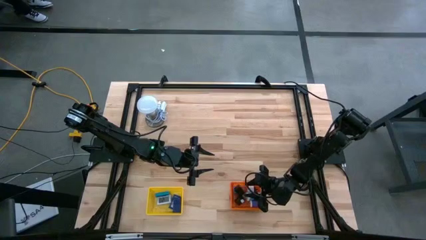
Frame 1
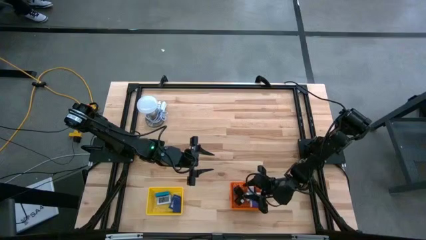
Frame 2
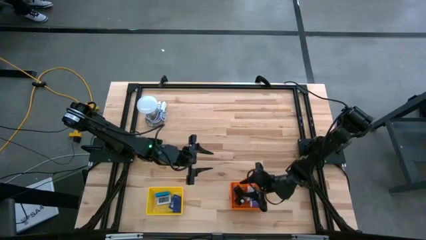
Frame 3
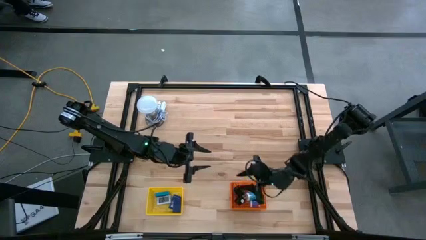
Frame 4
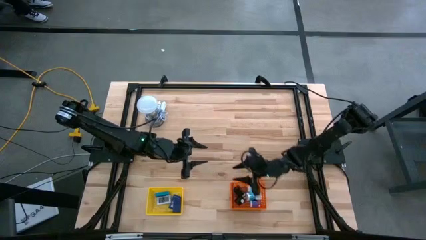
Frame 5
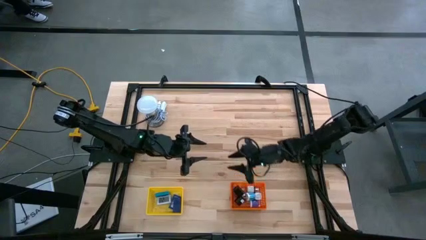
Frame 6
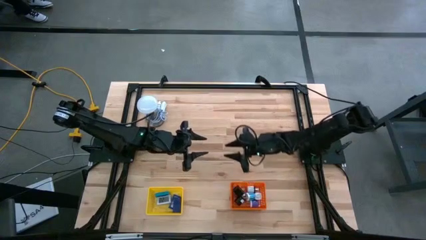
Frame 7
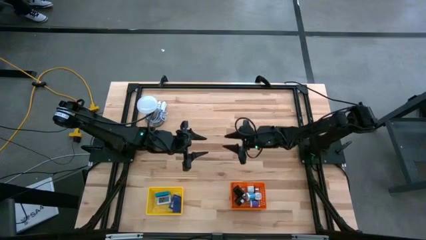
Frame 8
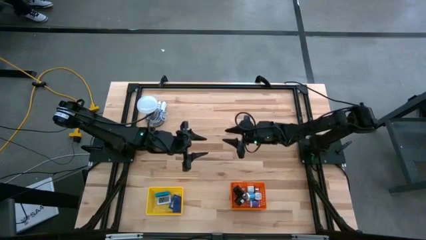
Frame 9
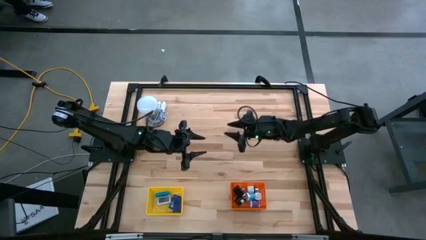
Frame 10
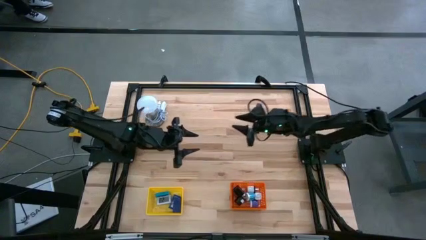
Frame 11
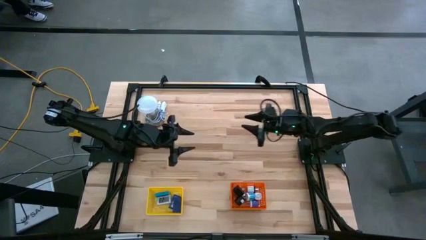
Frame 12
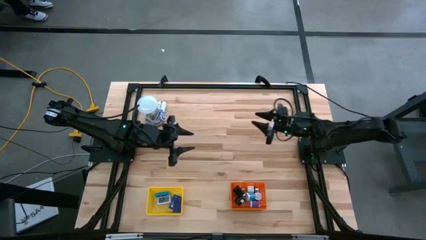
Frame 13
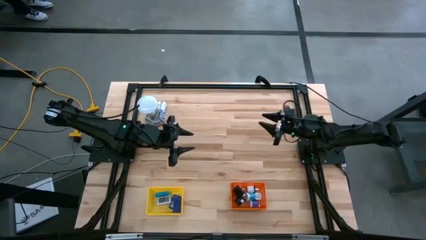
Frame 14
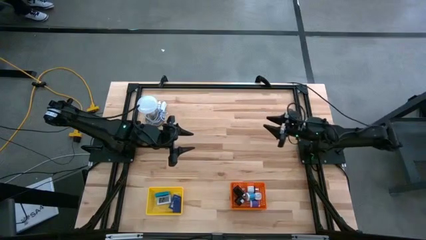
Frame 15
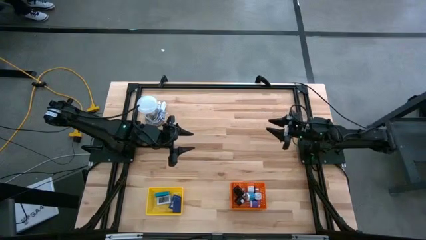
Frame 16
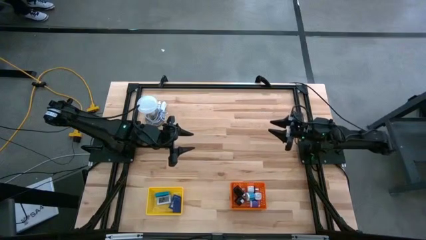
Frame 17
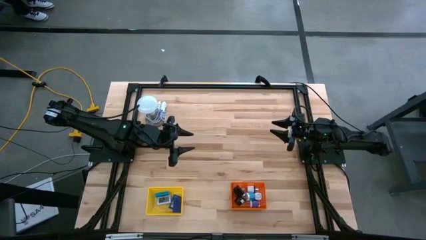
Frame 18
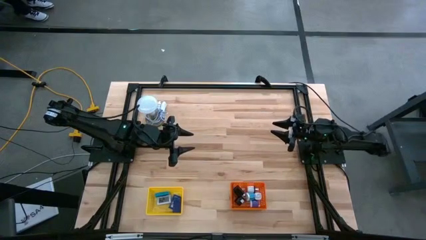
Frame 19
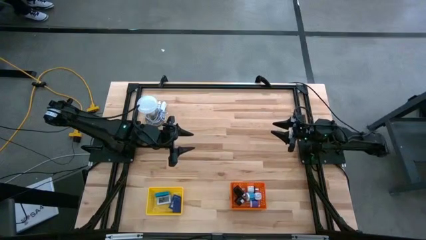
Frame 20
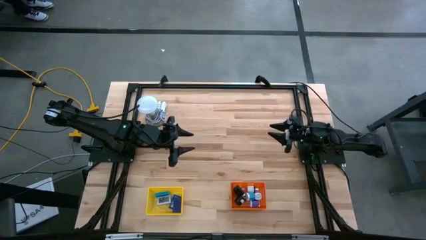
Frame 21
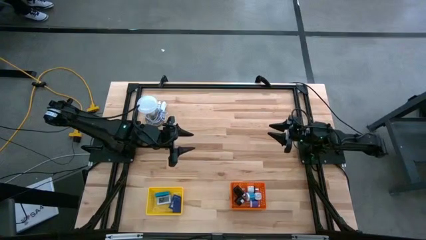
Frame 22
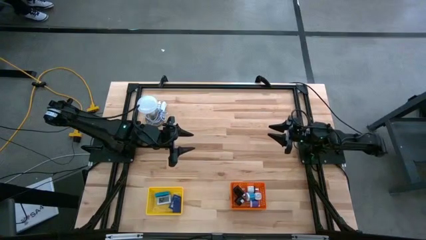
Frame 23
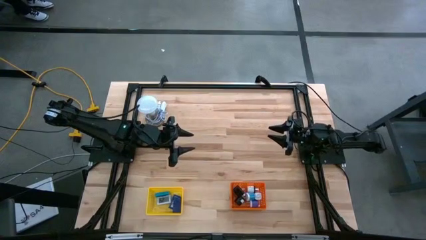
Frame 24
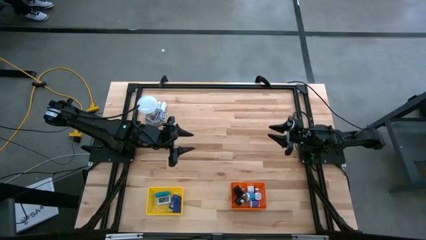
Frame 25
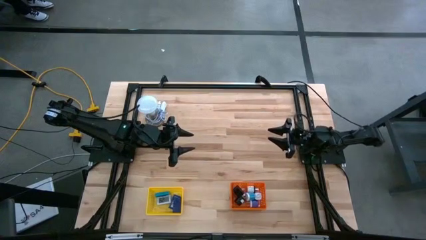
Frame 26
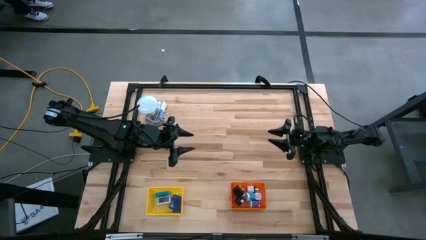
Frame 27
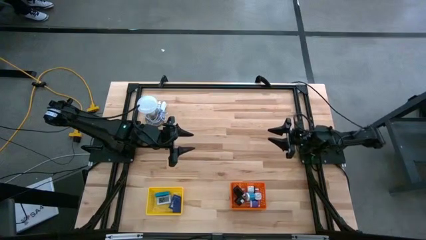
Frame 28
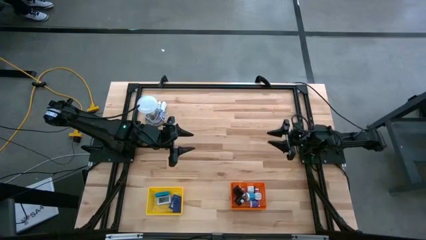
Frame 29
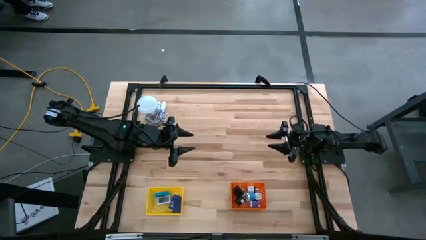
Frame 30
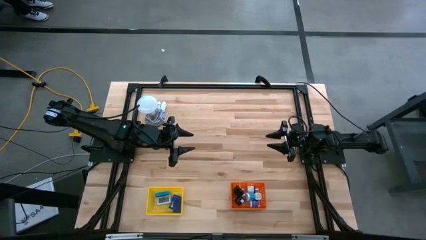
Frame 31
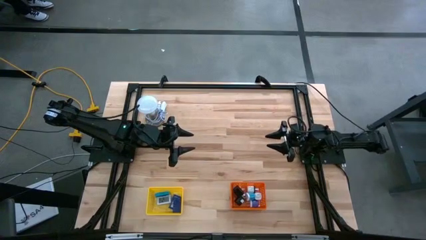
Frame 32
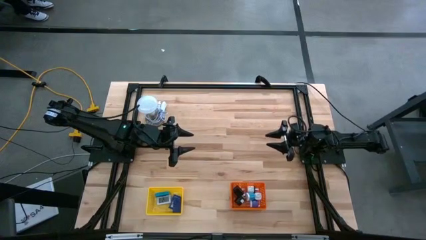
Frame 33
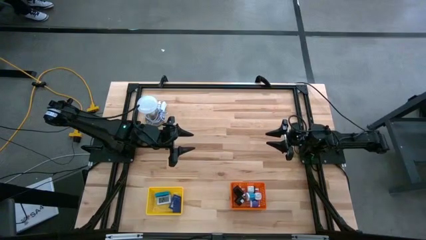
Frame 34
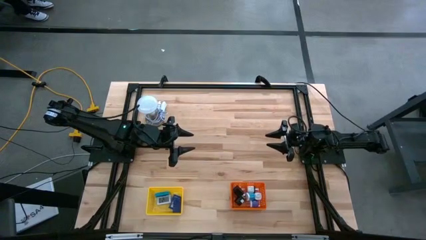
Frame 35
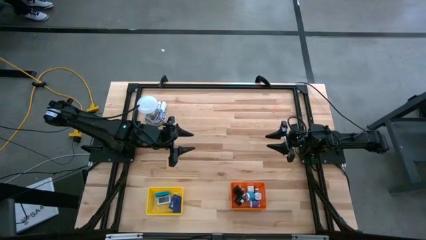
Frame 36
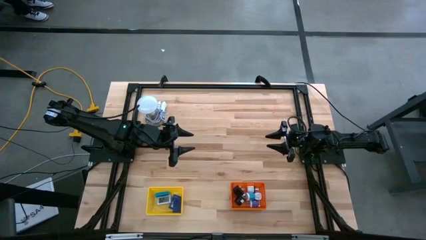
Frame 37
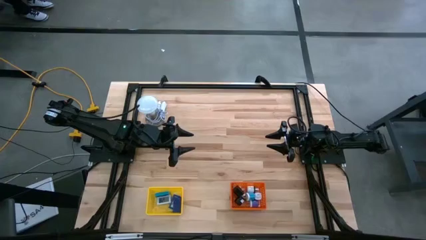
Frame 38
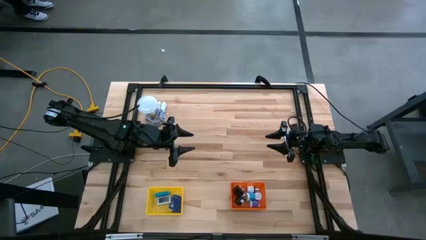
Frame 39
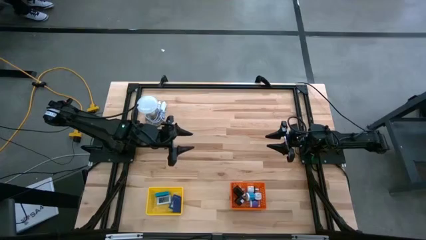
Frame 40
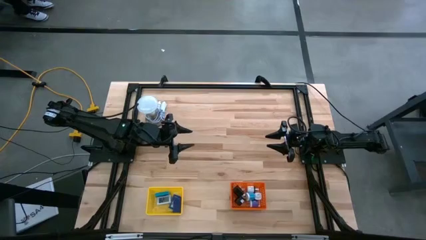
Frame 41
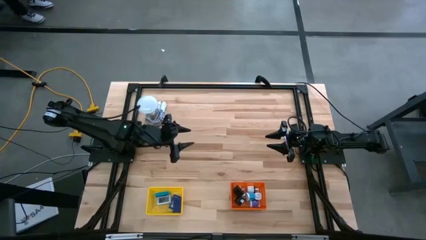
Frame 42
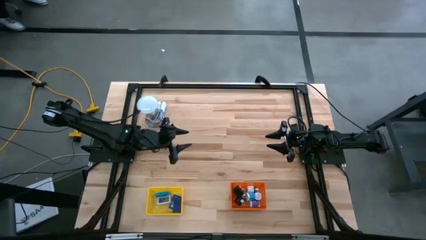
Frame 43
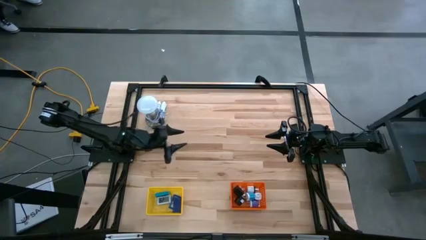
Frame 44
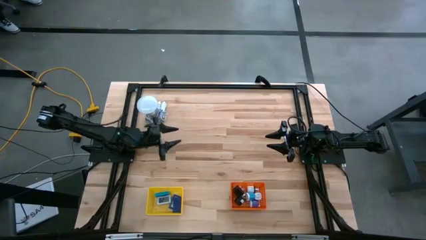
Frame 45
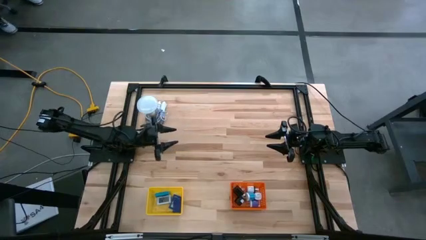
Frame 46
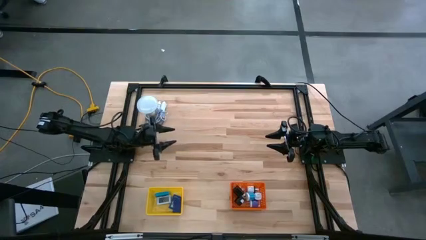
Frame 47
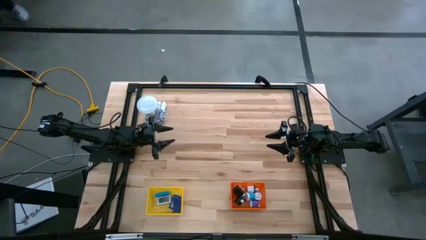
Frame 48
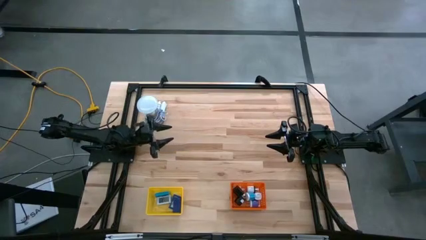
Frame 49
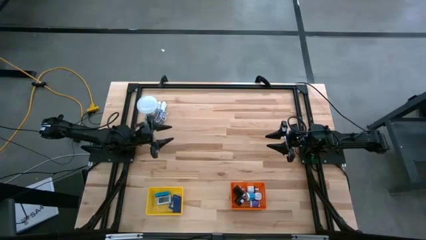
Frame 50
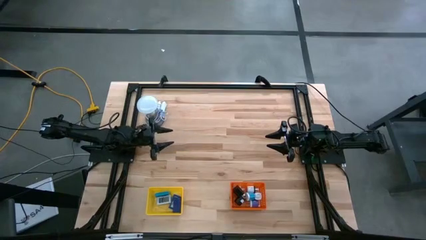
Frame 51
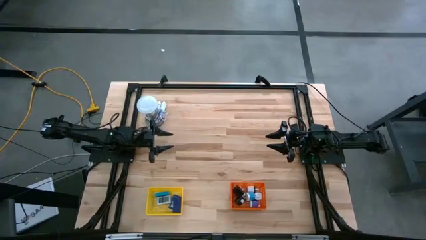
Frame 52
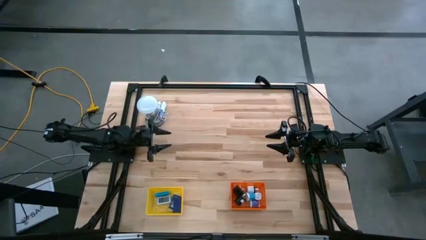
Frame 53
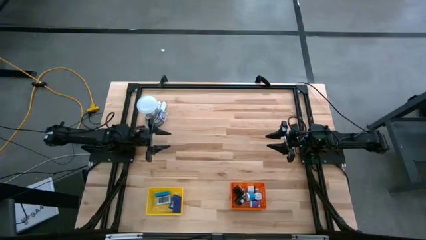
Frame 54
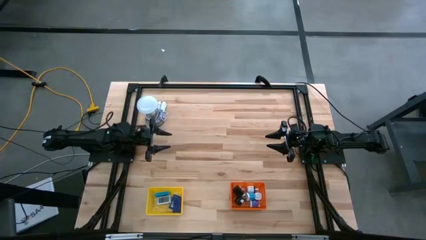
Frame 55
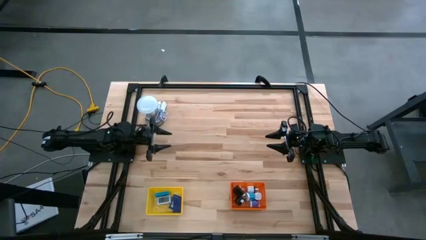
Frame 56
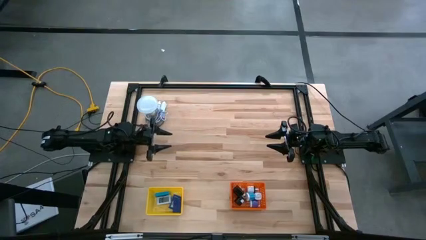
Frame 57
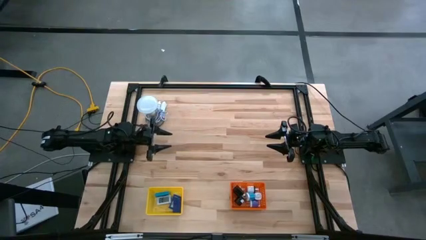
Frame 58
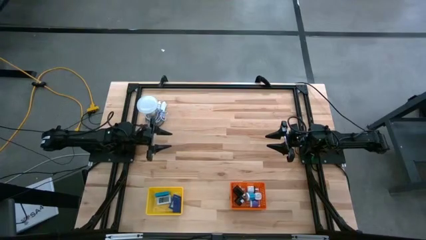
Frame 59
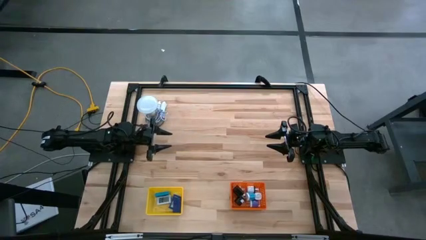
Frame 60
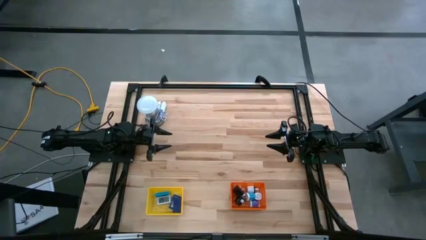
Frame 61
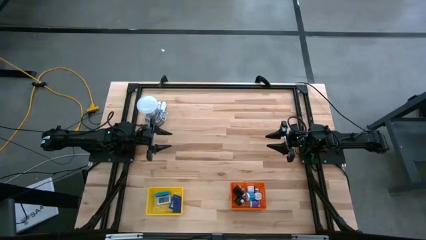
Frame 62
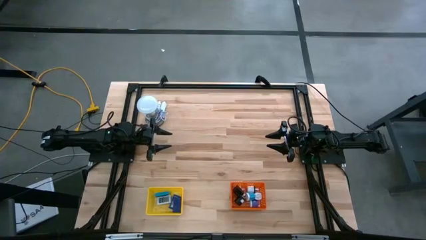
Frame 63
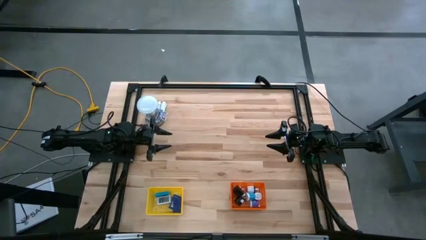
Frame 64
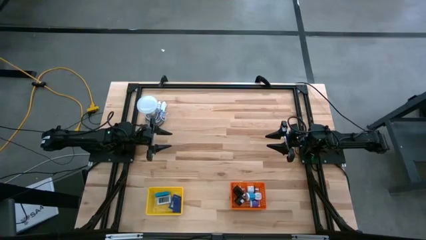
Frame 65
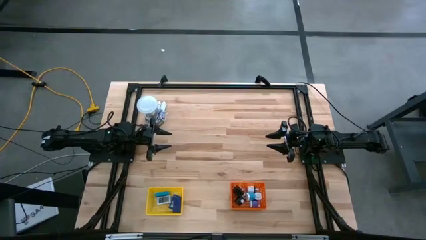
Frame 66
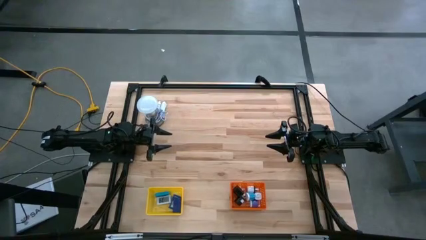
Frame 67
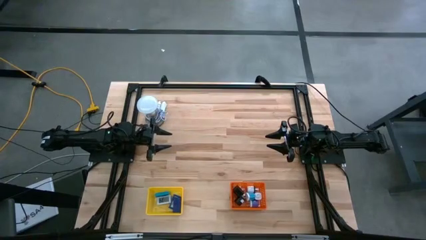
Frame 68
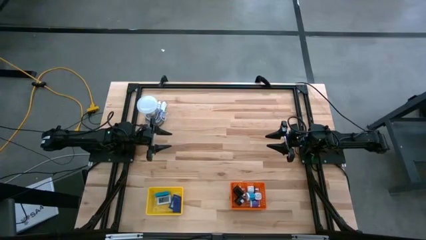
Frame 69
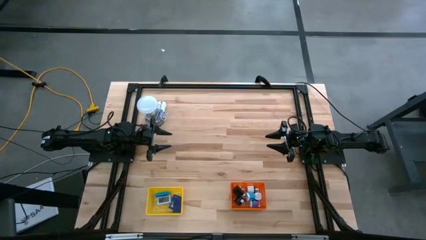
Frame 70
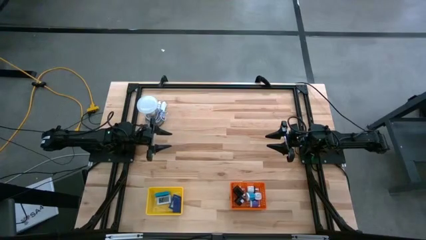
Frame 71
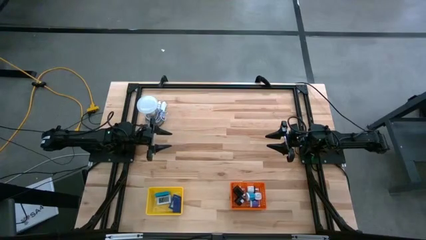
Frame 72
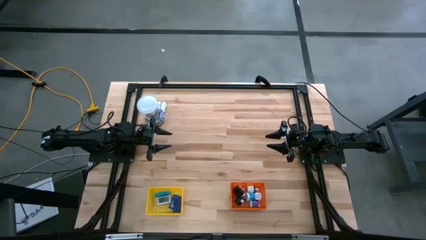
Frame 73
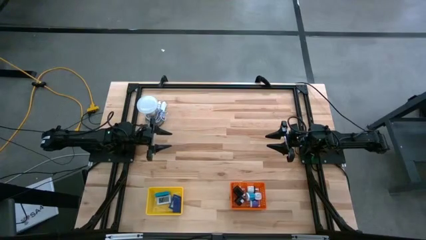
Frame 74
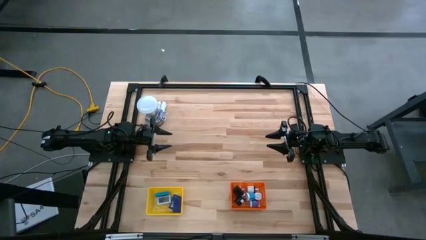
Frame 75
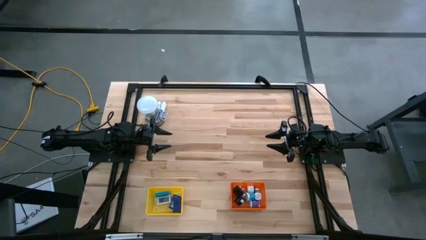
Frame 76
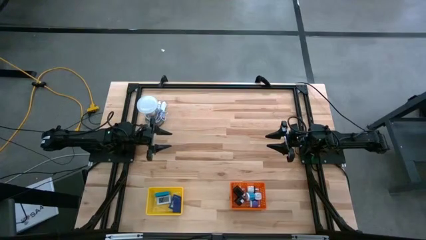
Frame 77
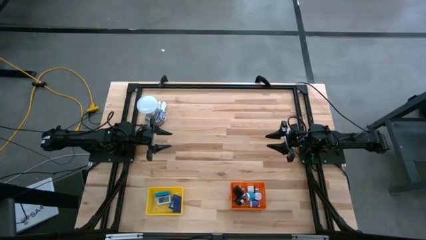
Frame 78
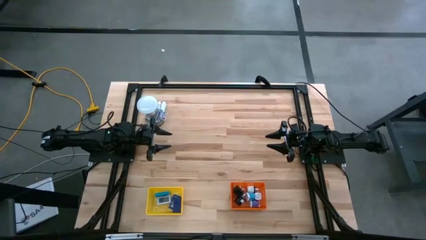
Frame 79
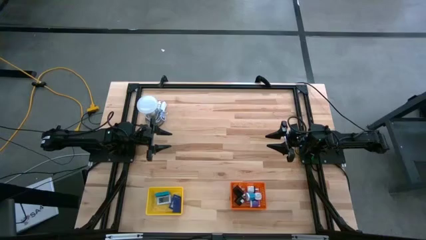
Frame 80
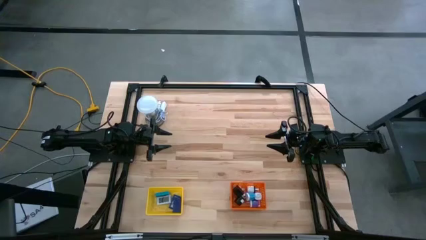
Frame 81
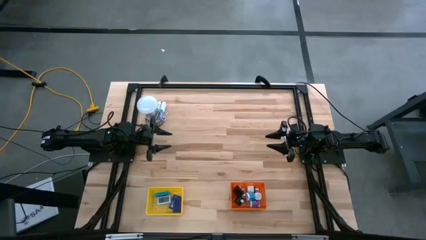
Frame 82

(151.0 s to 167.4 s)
Task: Pick & Place Office items
Return to Home Position
